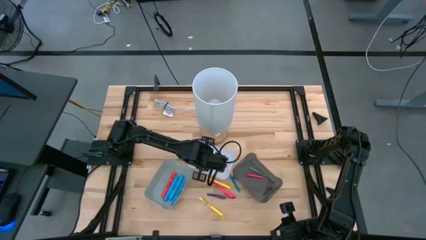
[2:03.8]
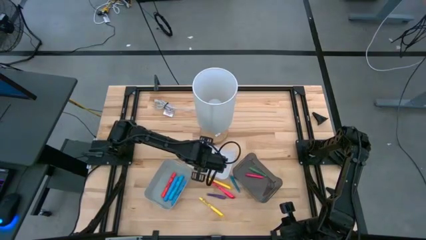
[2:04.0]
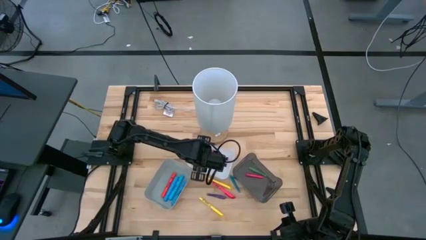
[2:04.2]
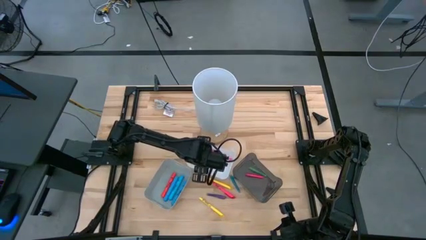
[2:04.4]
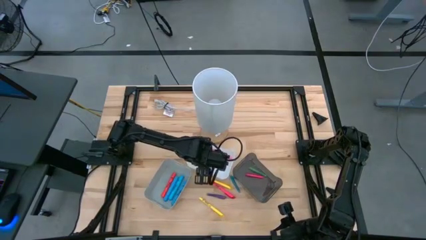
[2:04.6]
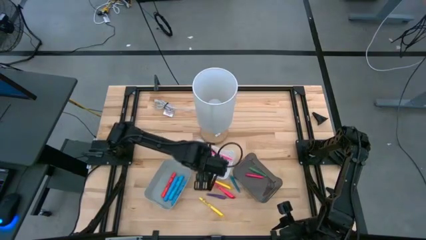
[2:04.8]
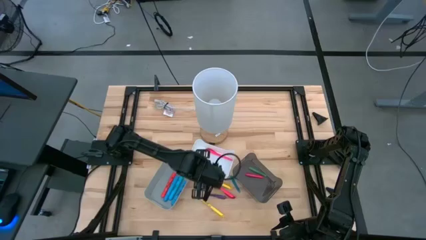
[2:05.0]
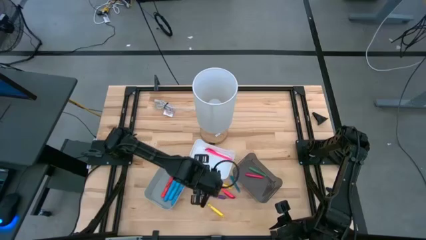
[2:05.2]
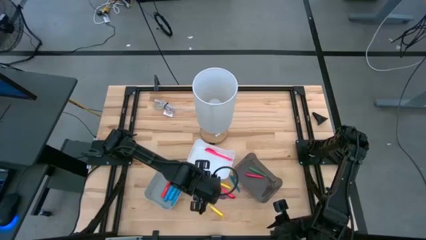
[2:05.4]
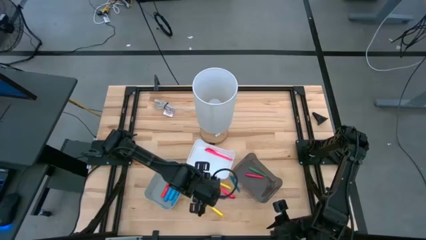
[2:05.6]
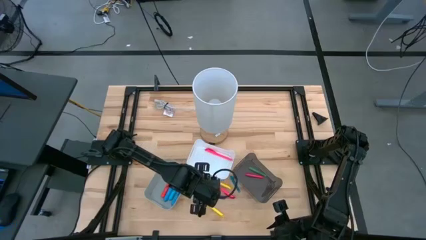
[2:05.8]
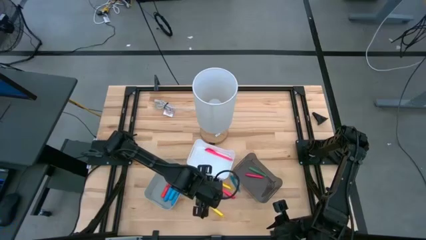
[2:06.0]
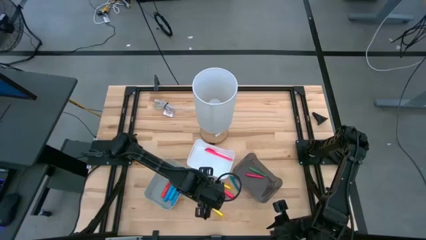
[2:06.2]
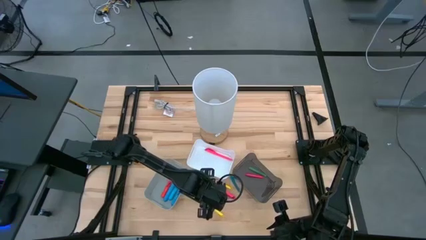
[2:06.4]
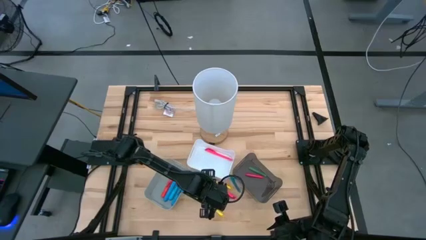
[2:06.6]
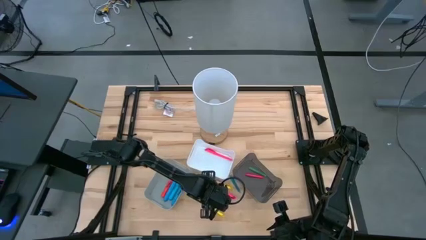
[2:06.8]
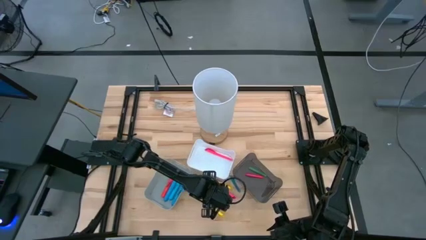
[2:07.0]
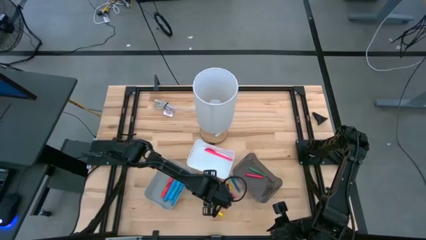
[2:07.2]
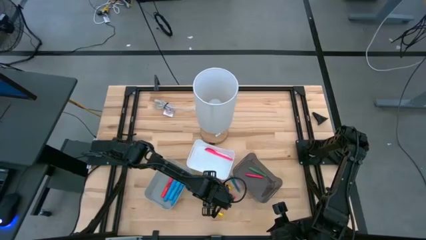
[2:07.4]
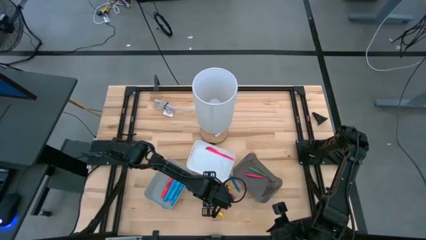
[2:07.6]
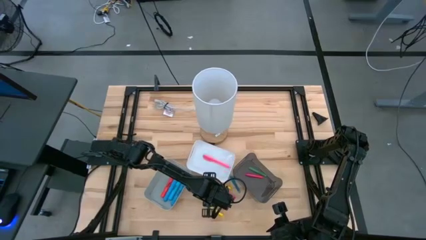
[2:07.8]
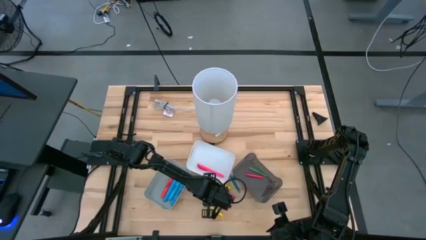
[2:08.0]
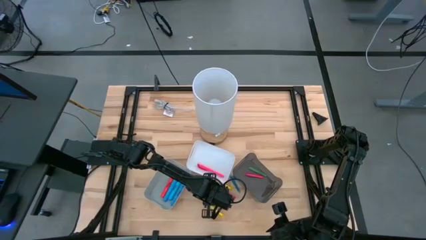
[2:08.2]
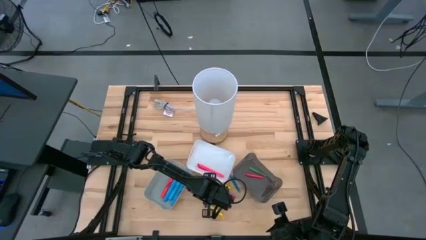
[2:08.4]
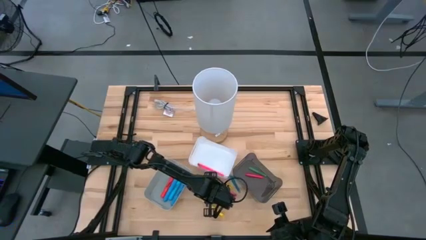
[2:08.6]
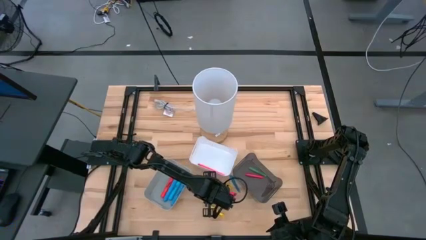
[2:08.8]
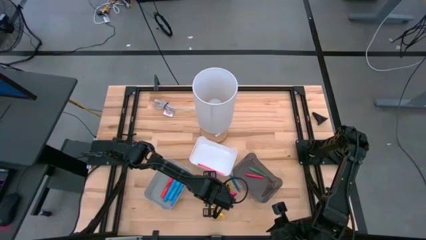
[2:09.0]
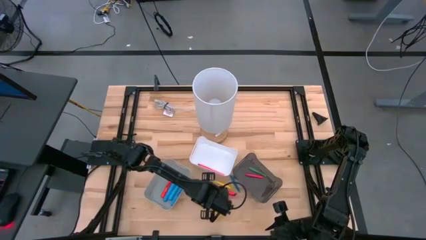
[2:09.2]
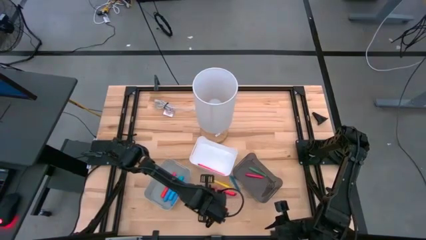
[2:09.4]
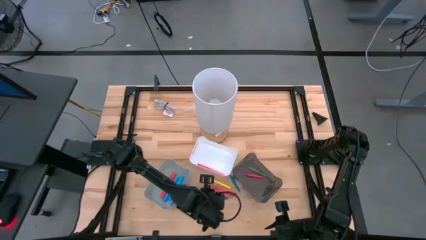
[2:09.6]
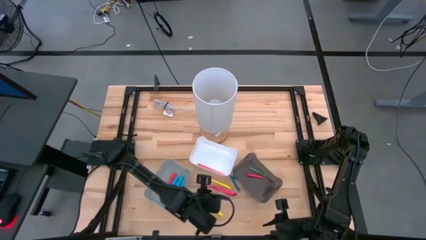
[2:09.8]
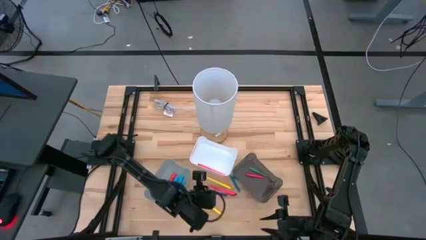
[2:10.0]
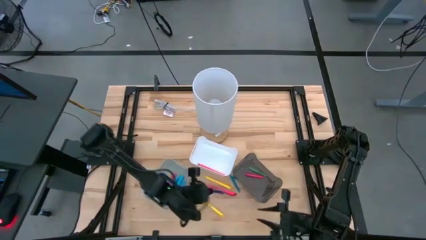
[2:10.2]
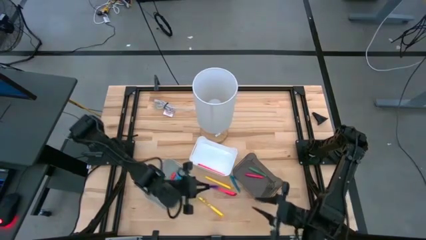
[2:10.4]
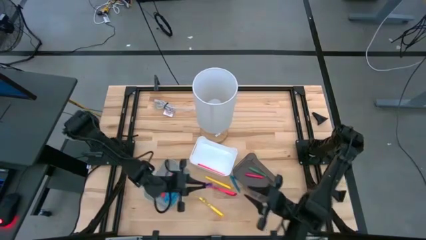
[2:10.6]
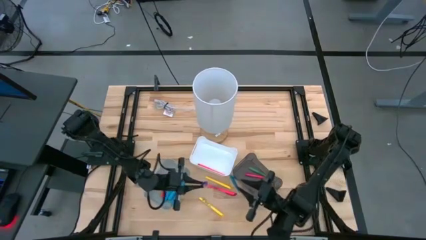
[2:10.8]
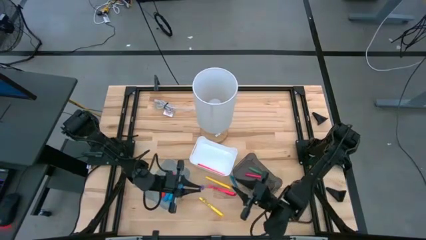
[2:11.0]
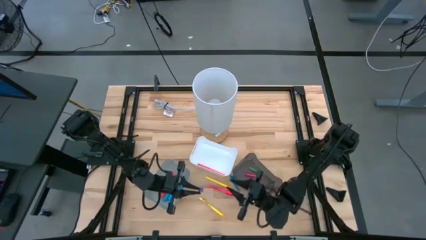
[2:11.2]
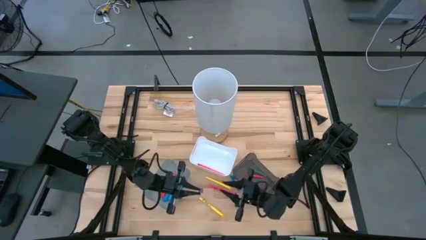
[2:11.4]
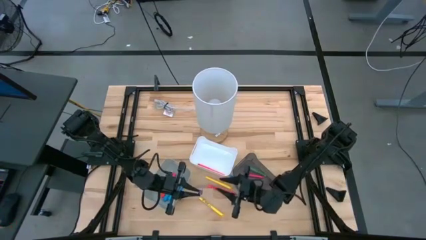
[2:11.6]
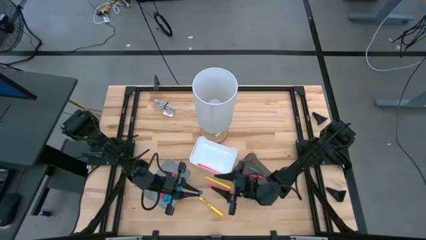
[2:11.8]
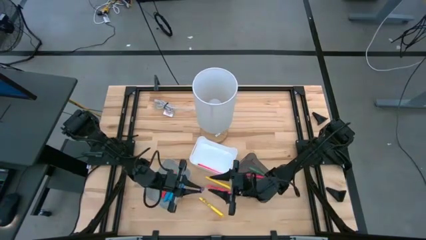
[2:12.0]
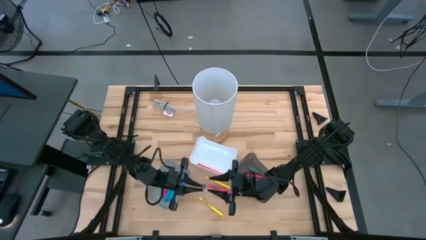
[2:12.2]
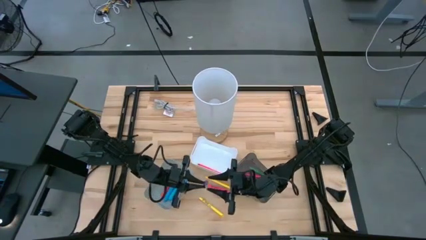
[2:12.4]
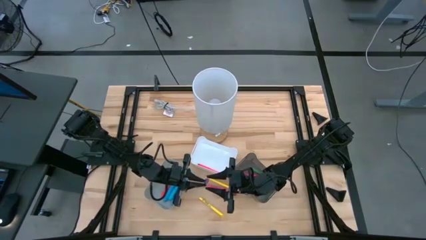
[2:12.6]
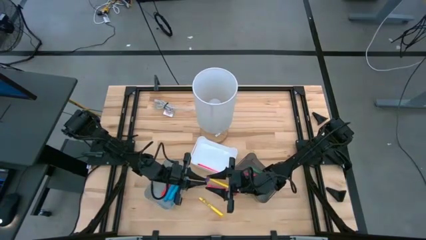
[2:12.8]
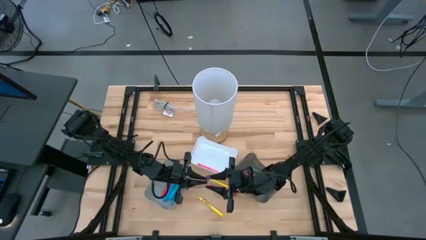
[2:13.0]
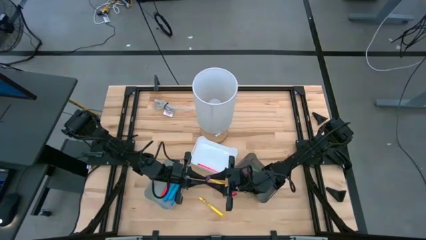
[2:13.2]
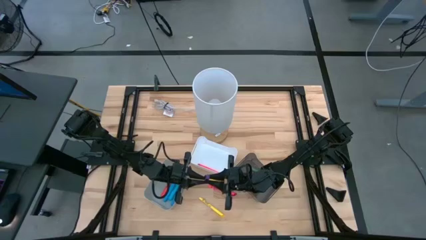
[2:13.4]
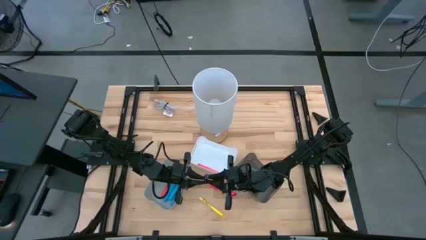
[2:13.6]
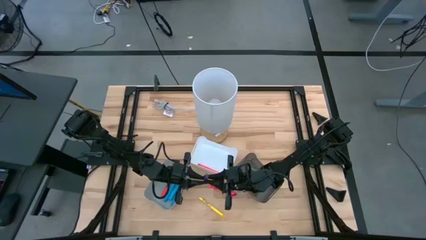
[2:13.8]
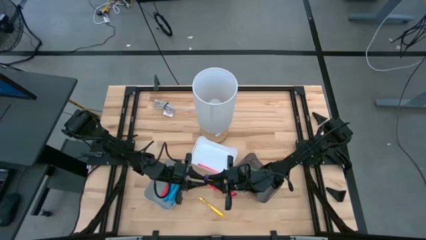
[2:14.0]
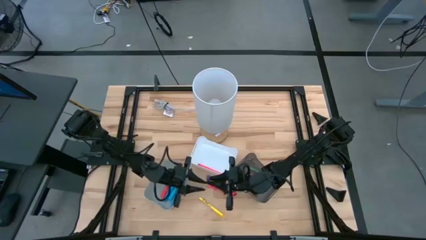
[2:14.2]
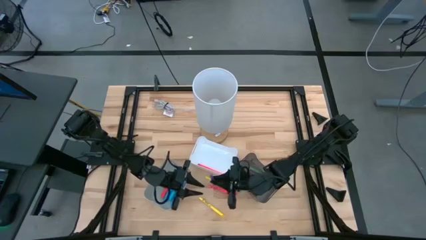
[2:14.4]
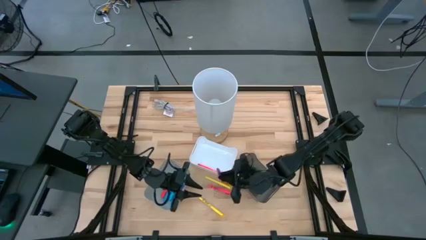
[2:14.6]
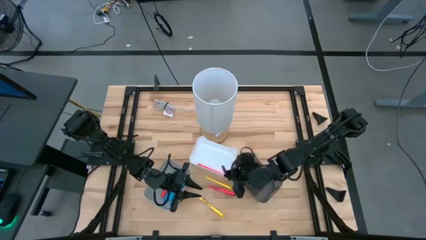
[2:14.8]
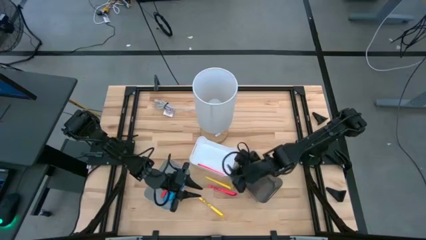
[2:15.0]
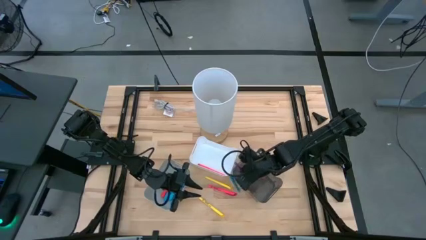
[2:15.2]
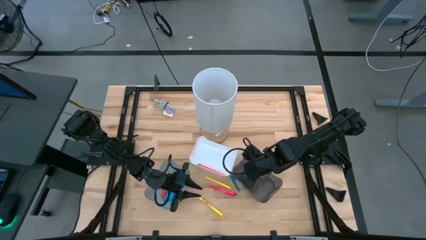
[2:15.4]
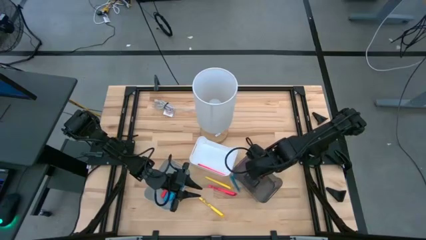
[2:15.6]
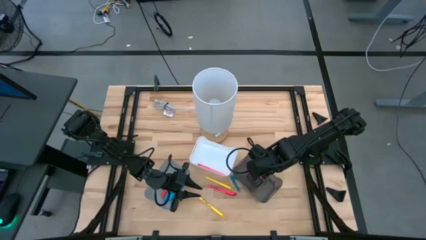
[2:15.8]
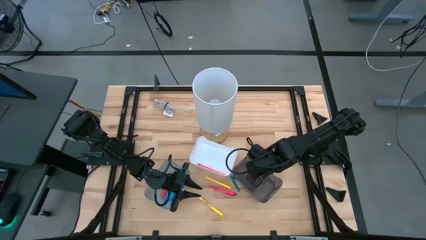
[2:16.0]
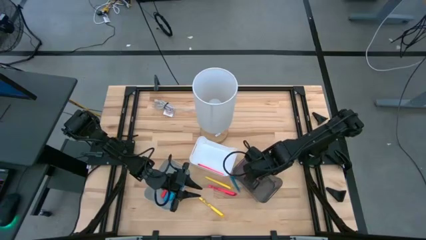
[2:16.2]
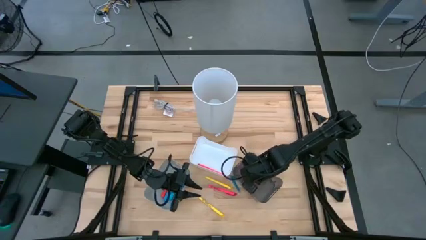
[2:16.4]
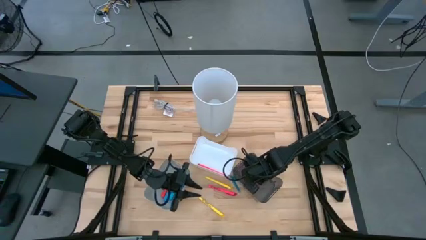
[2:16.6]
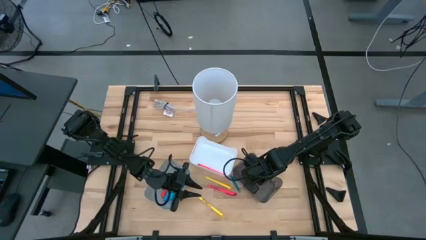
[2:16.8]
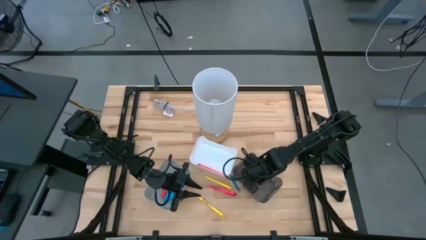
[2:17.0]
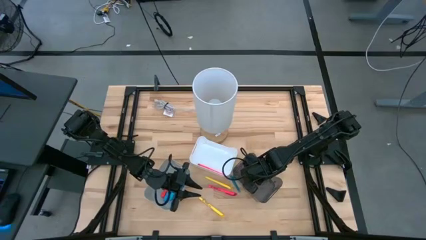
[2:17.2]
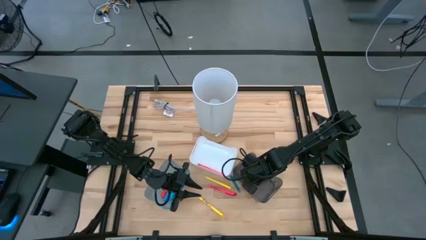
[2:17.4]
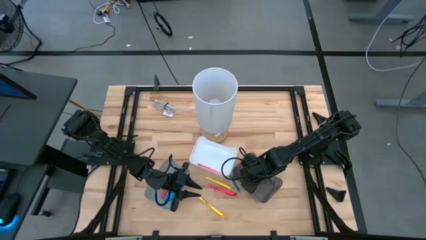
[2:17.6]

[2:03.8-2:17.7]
Task: Pick & Place Markers
Put the purple pen in the black bin

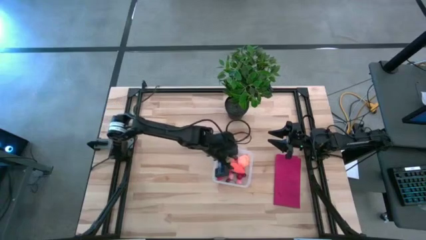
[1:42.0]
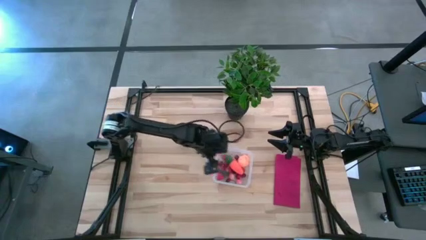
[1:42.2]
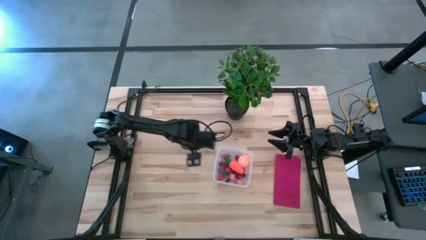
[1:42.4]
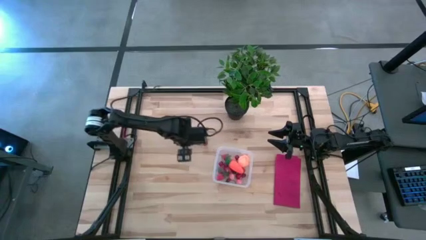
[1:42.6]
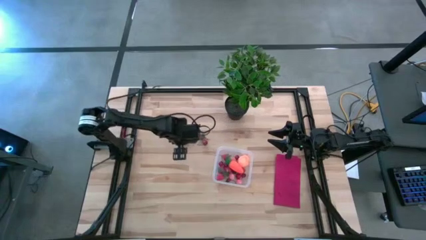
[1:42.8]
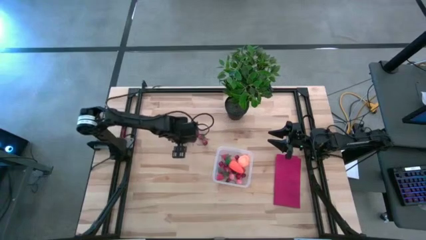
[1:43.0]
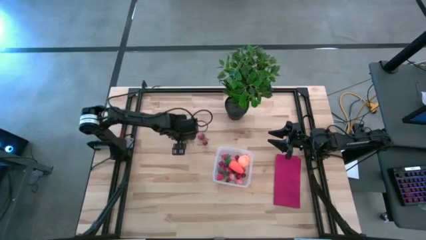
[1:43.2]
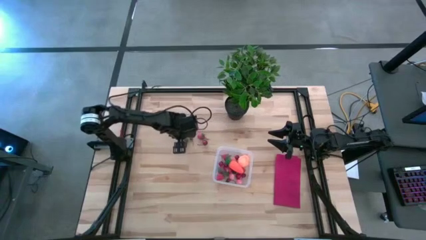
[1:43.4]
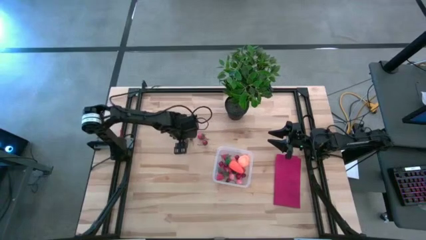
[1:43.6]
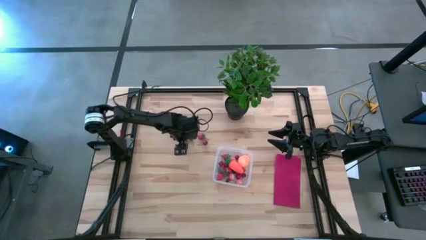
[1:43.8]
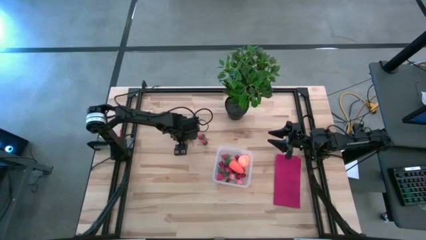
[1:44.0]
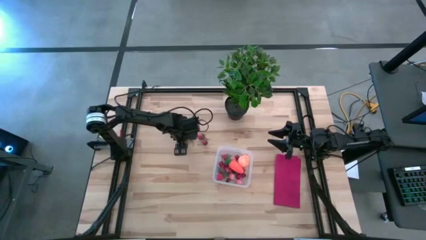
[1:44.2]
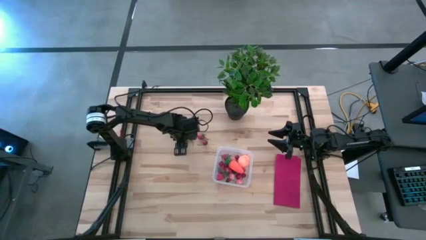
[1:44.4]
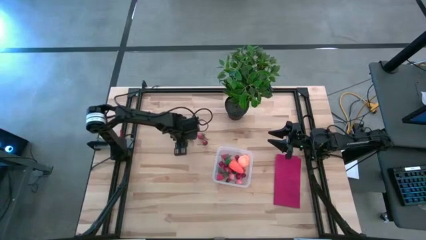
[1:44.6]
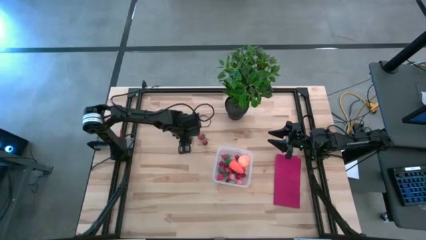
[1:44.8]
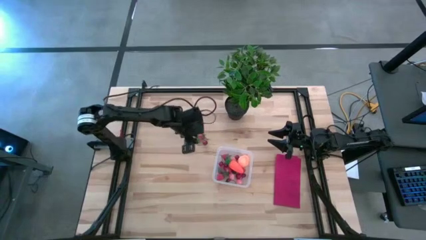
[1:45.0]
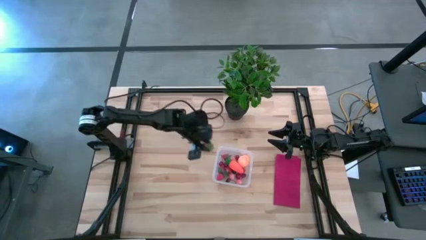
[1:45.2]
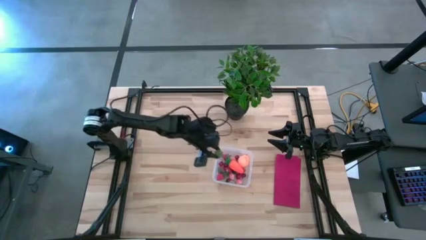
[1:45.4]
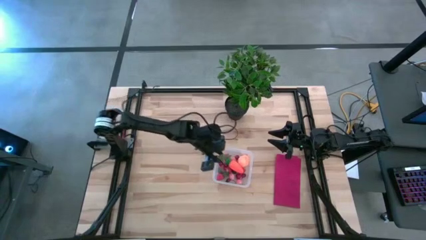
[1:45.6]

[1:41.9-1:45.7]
Task: Pick and placing Produce into tupperware
Put the red strawberry into the transparent bin
